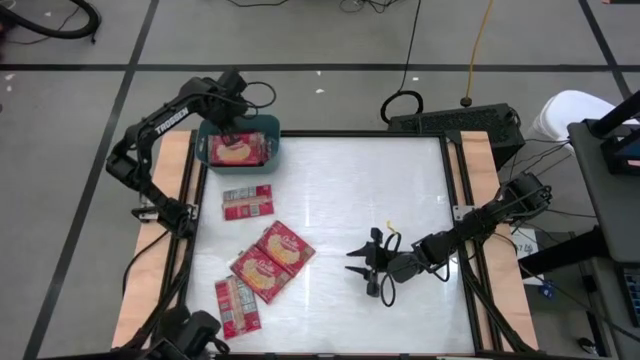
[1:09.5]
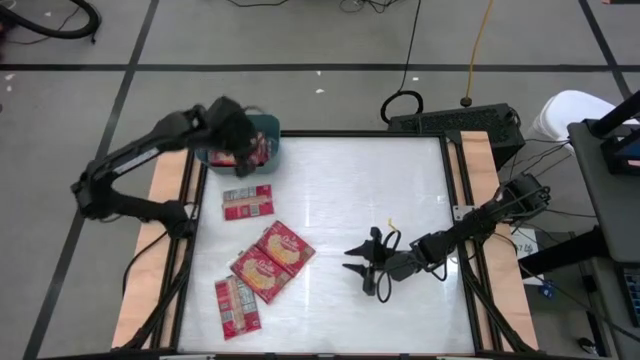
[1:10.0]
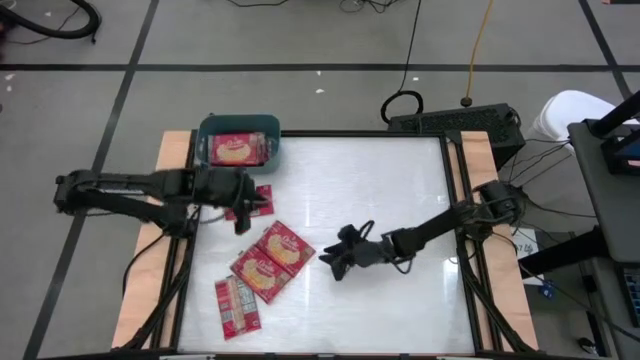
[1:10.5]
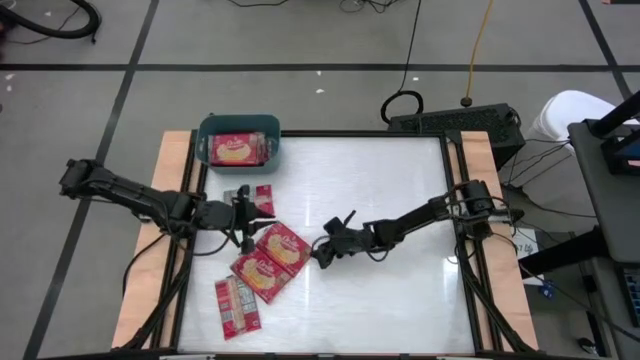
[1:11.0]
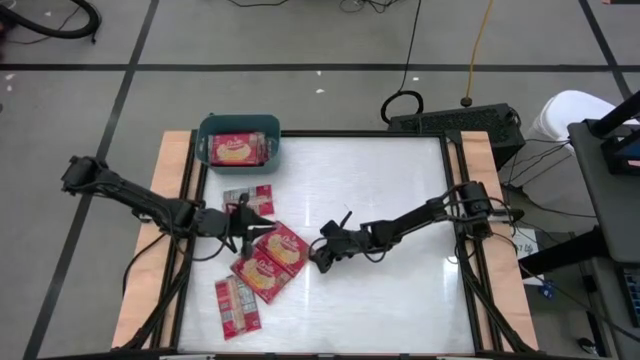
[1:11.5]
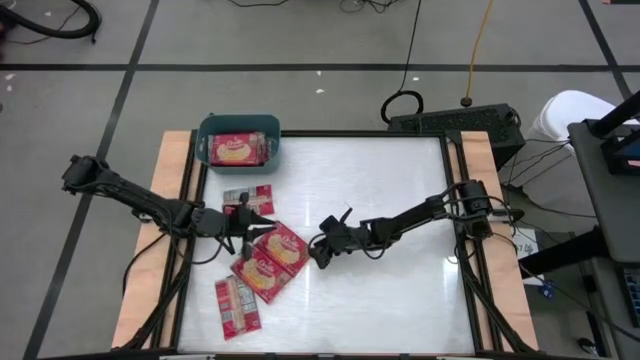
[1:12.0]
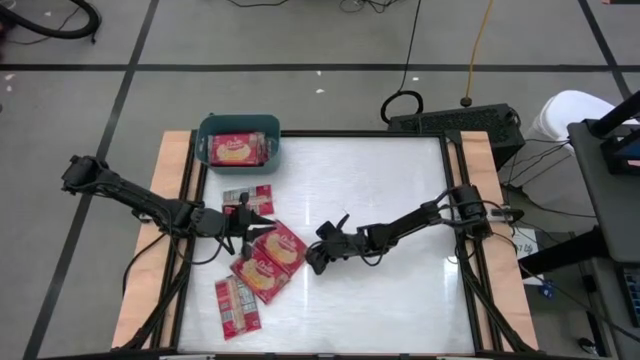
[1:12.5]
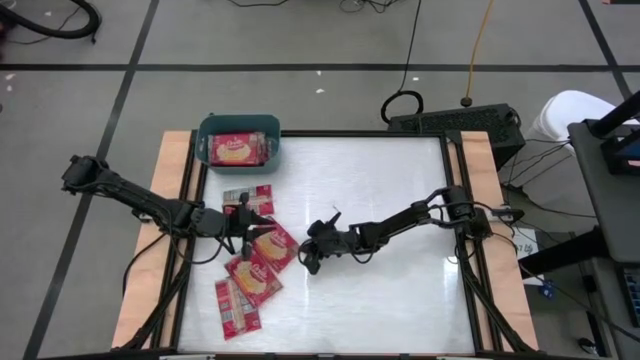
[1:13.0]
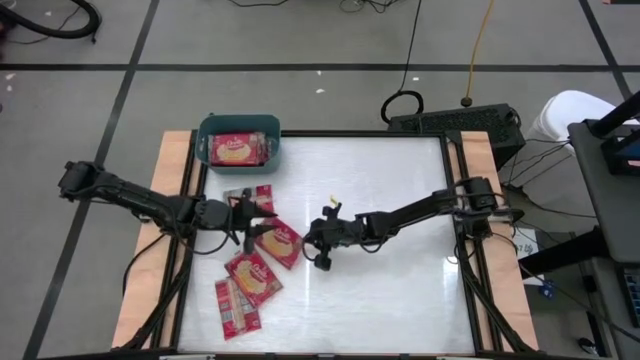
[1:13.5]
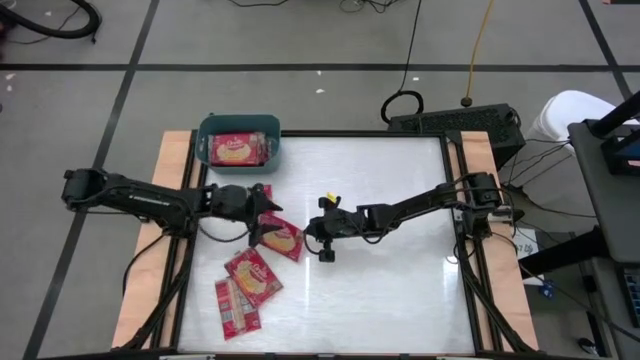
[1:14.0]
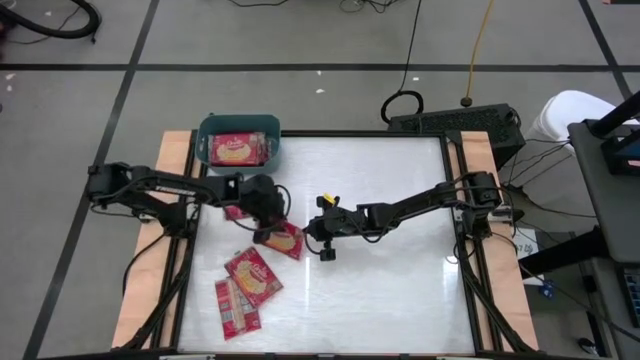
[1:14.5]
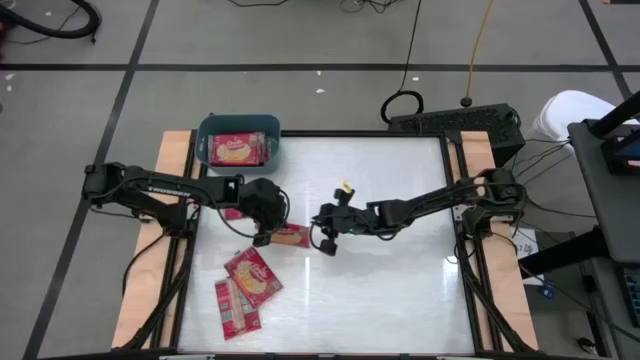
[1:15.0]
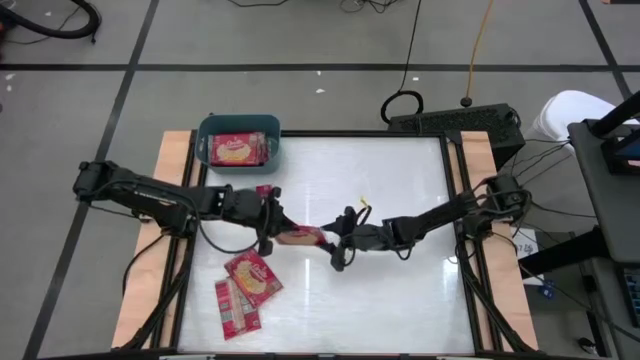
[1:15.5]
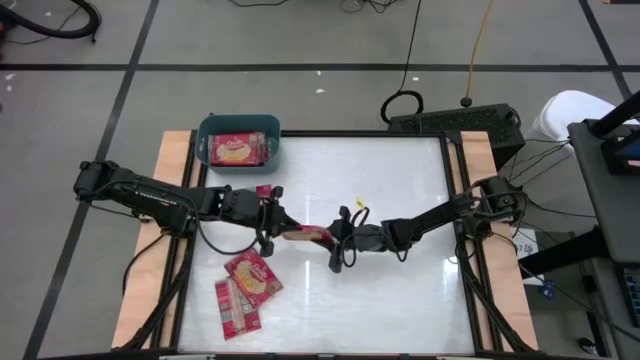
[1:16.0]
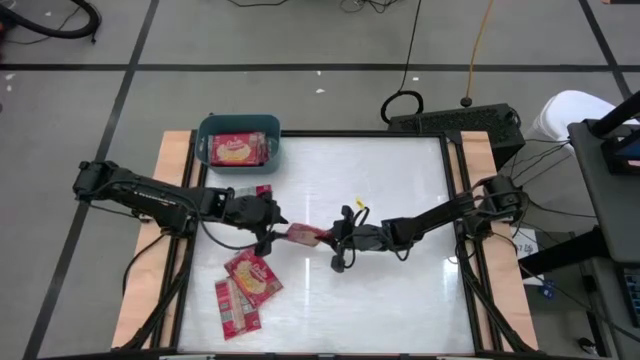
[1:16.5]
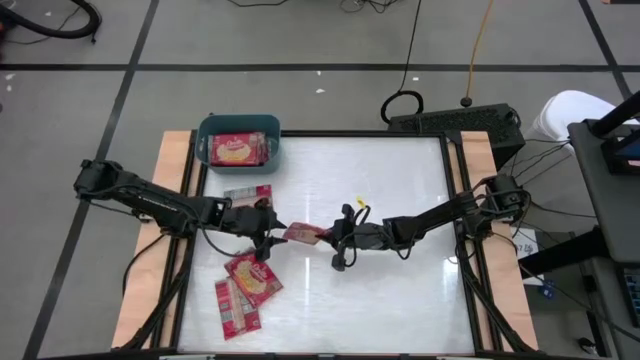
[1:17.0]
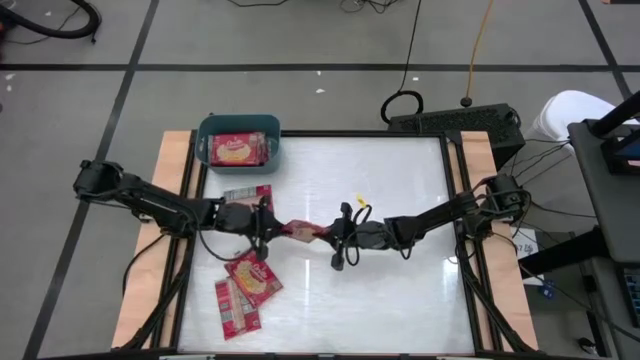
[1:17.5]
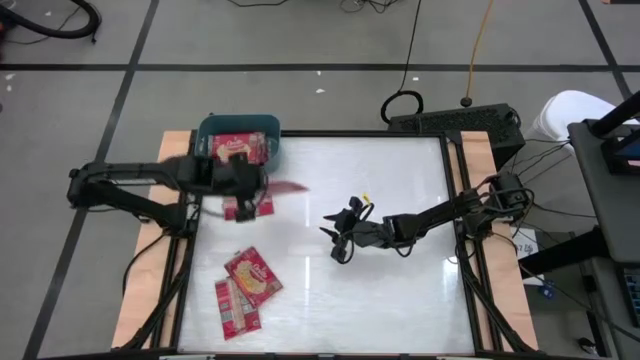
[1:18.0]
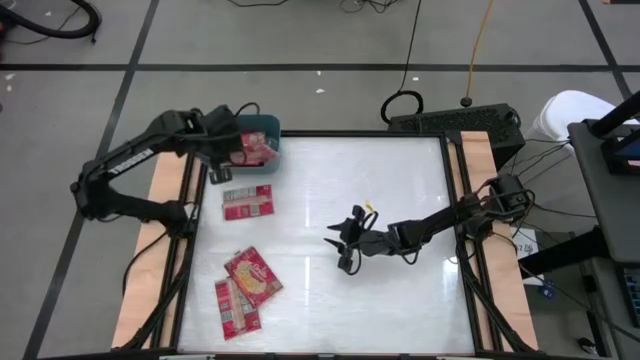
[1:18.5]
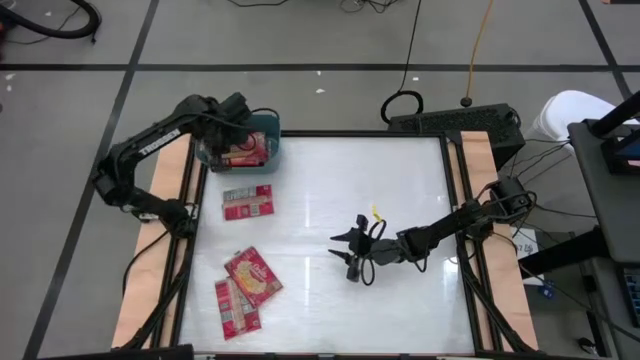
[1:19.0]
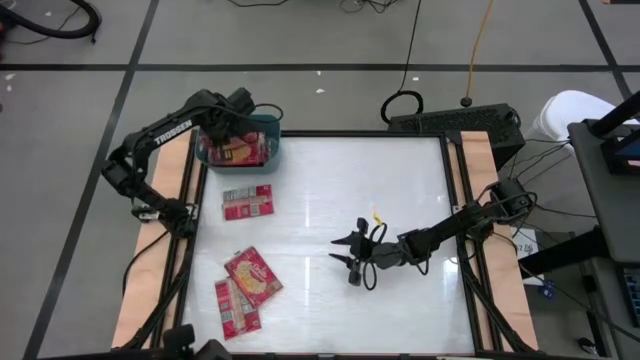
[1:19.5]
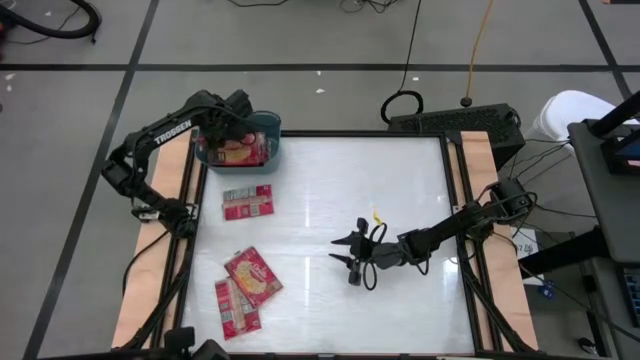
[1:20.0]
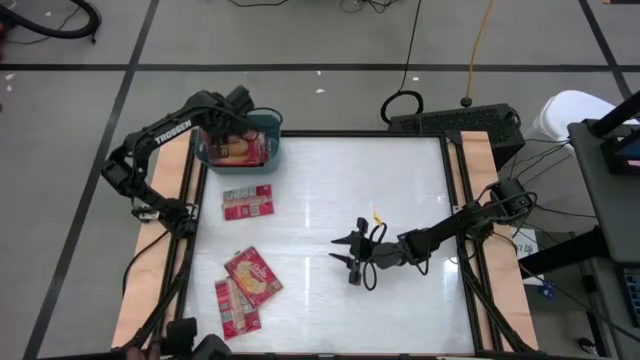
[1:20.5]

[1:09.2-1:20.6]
Task: Sort popcorn bags into baskets
Put the red popcorn bag into the blue bin

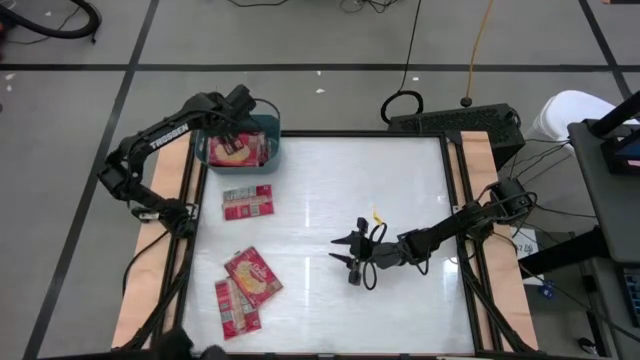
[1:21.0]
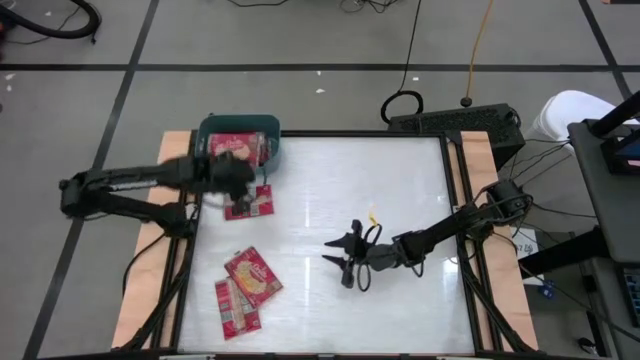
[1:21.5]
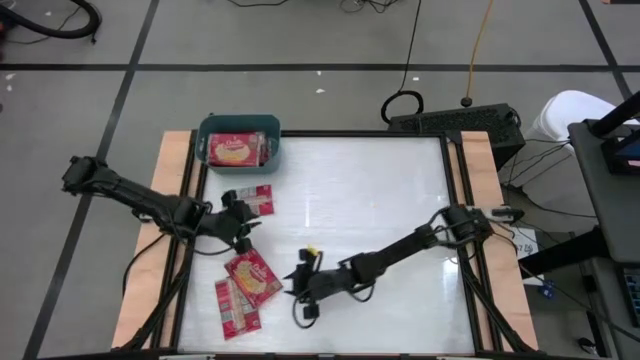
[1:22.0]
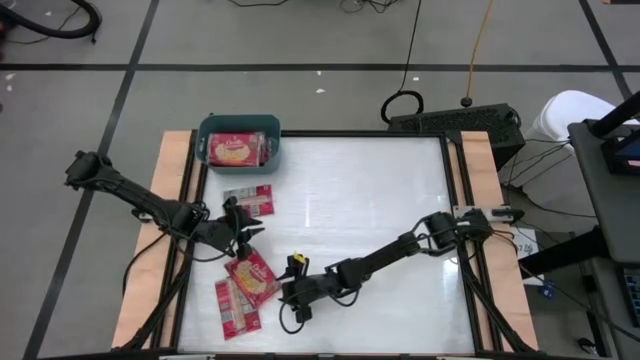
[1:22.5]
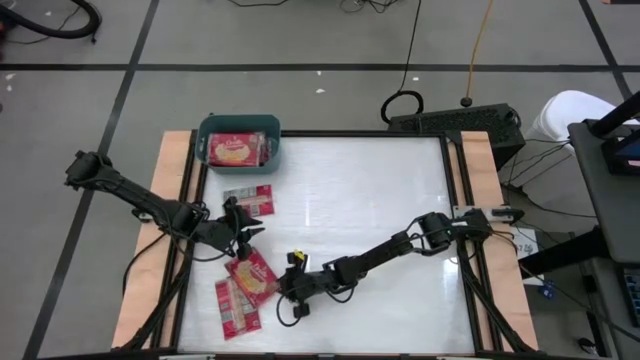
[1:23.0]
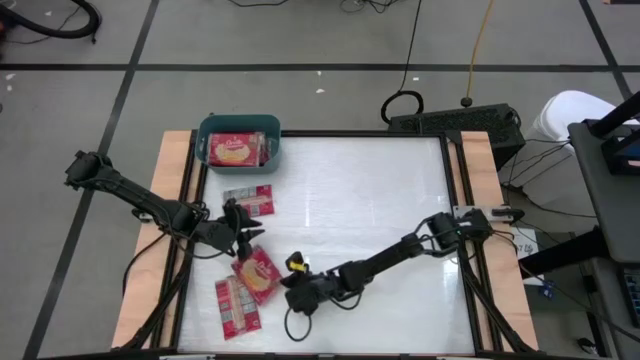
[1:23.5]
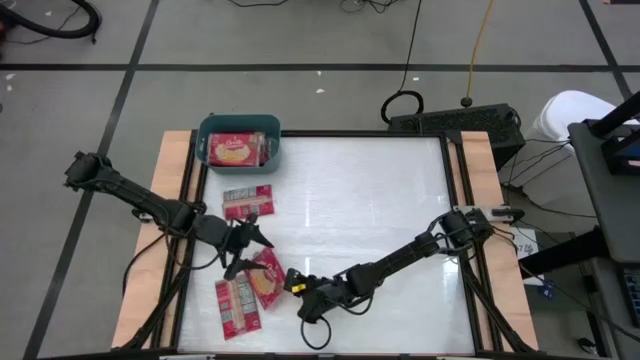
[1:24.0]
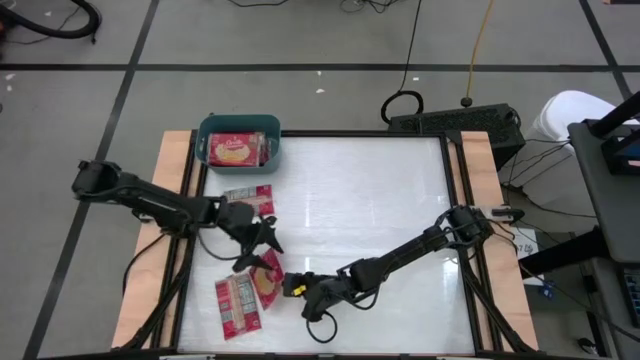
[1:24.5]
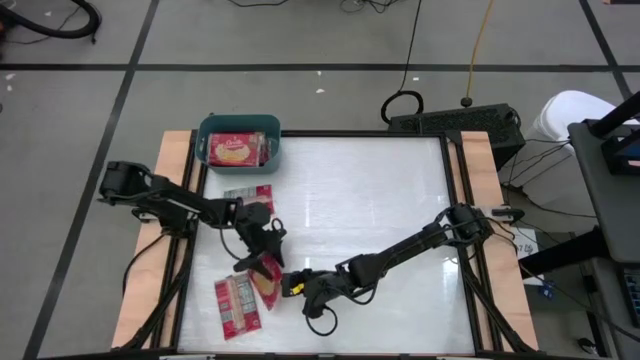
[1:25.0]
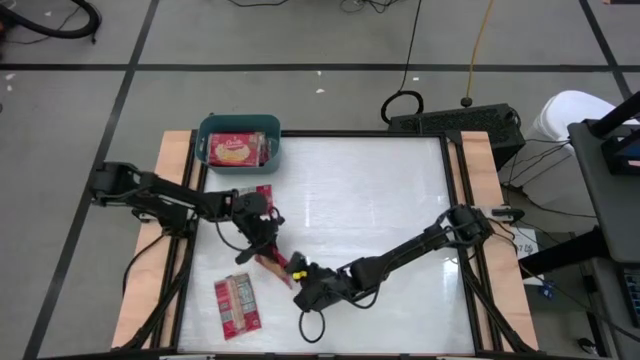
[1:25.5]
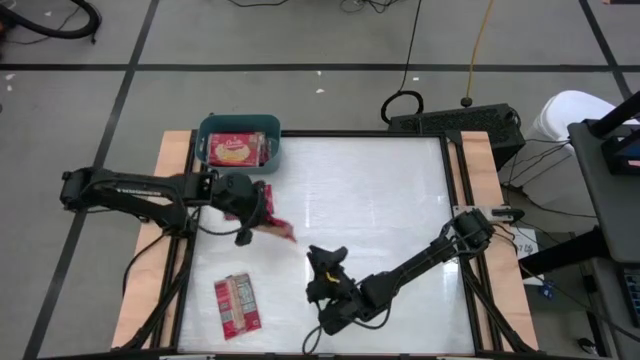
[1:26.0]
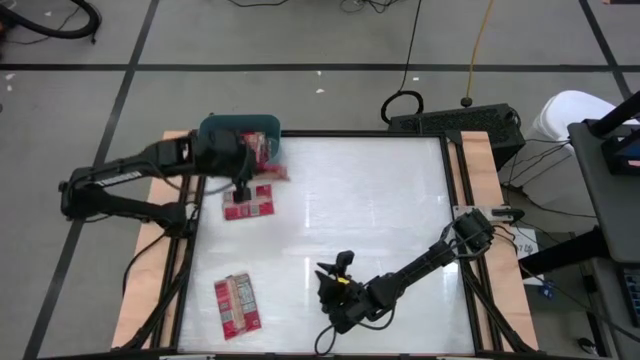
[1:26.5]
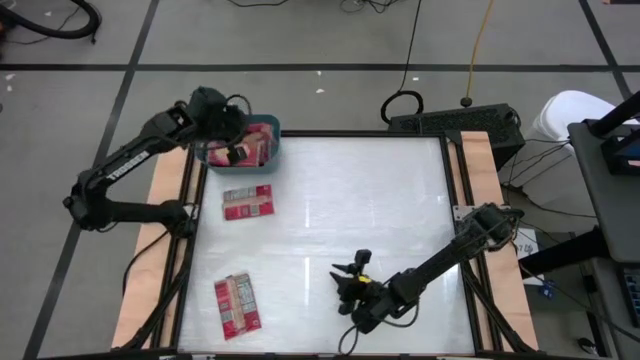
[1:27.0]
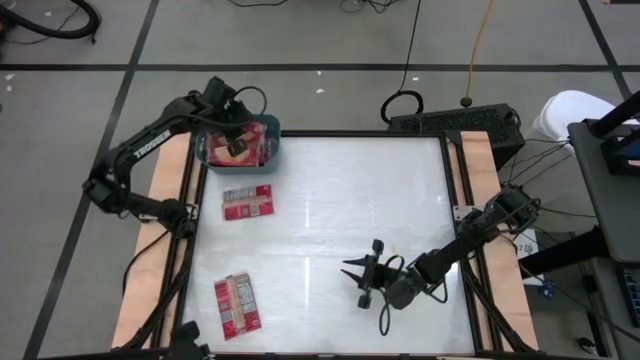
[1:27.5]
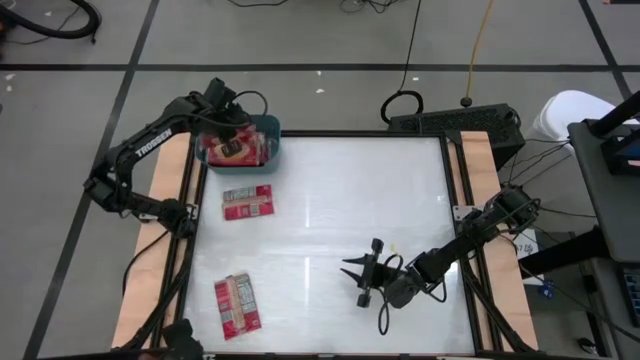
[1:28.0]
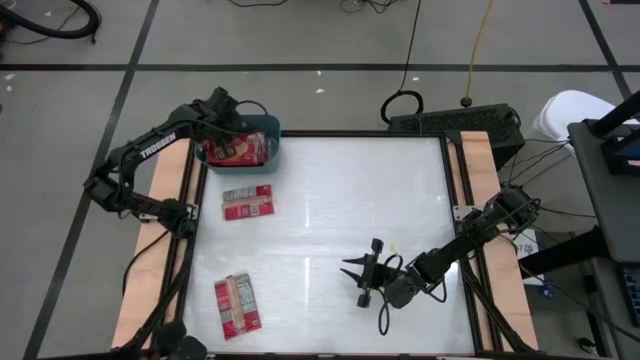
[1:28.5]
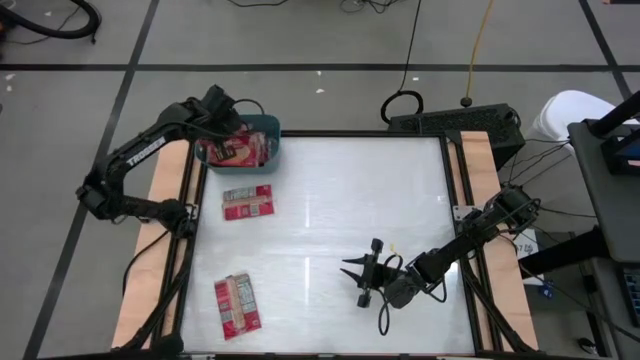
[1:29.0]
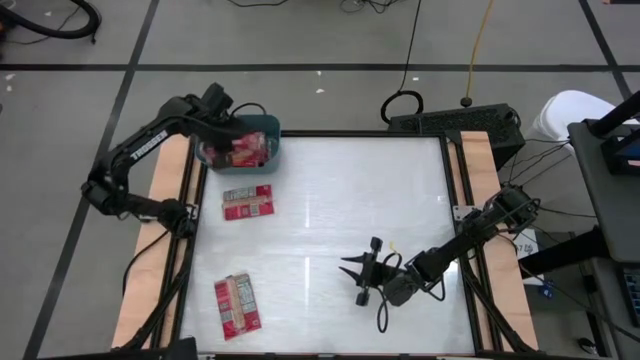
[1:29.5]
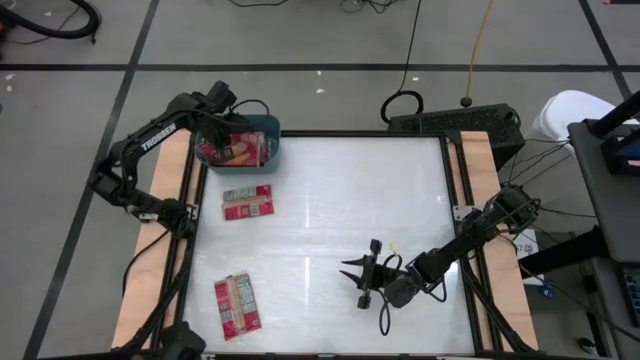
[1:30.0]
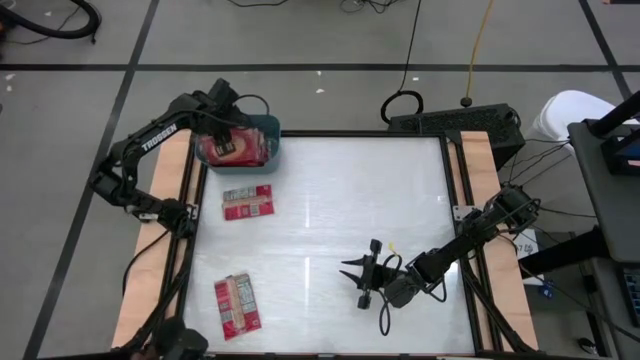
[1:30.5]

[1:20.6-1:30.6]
Put the red popcorn bag into the blue bin
